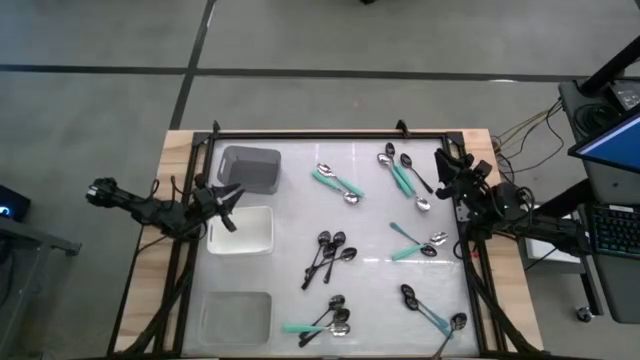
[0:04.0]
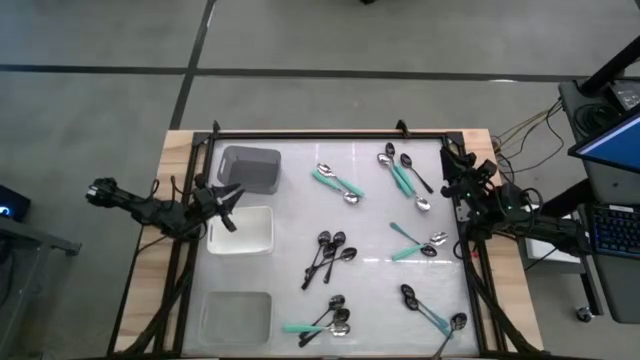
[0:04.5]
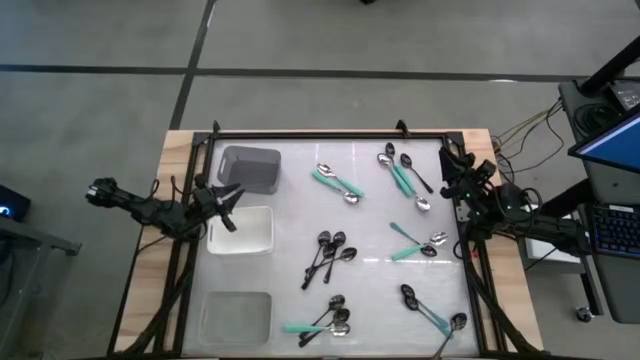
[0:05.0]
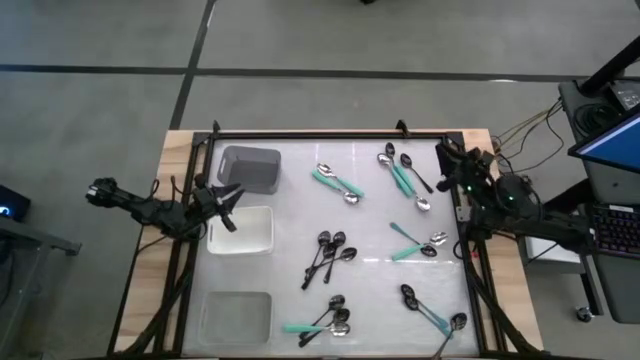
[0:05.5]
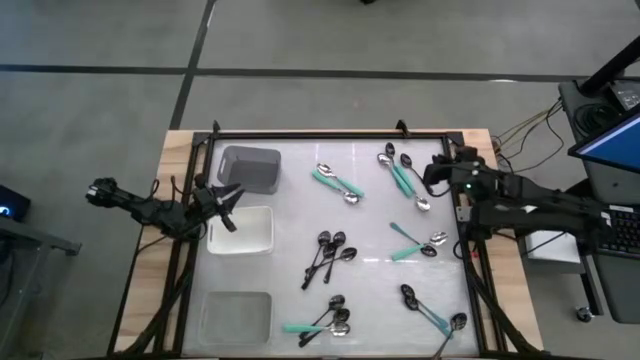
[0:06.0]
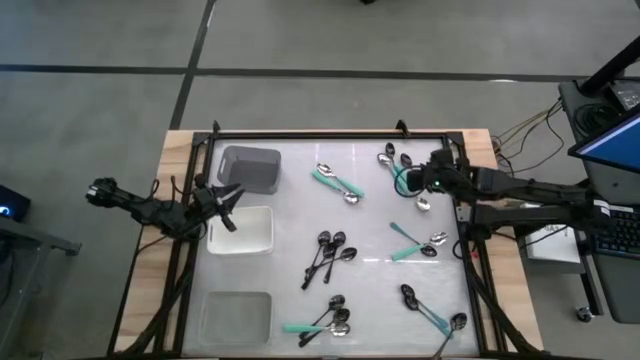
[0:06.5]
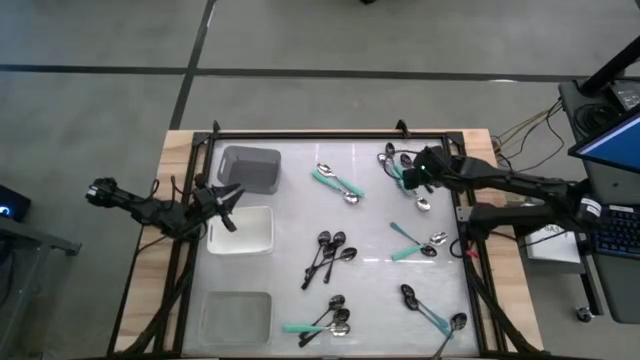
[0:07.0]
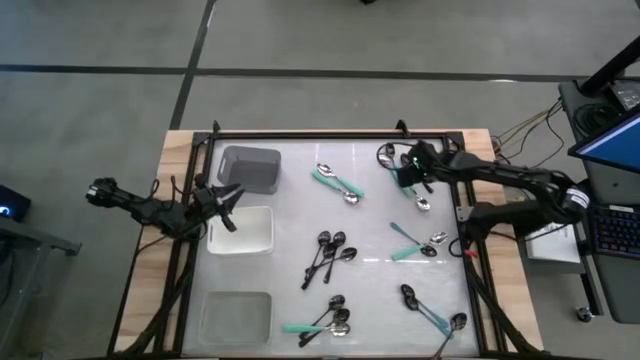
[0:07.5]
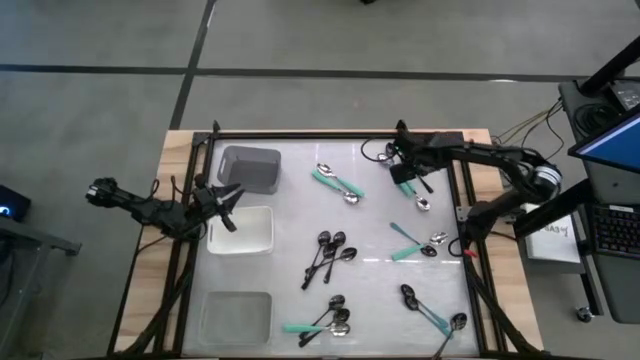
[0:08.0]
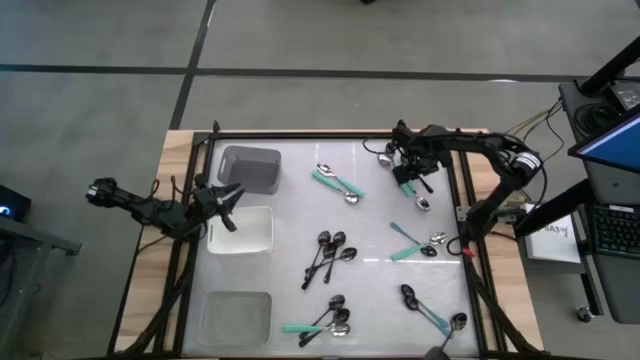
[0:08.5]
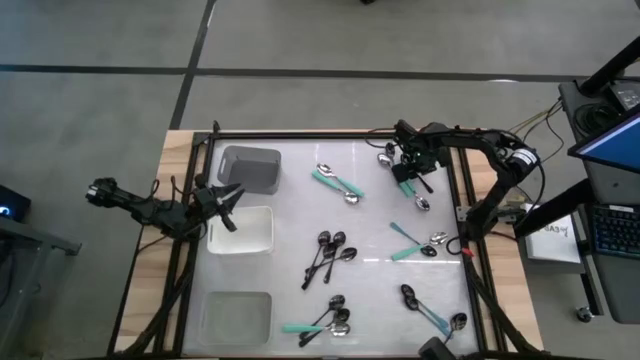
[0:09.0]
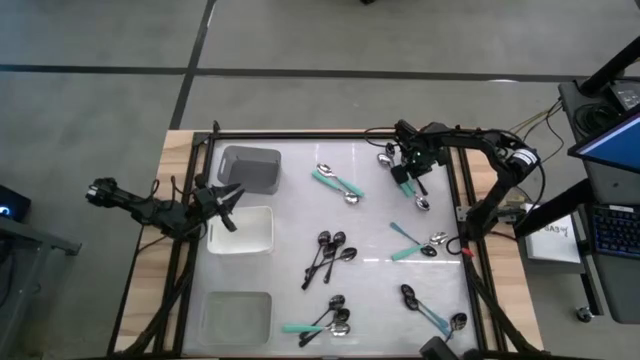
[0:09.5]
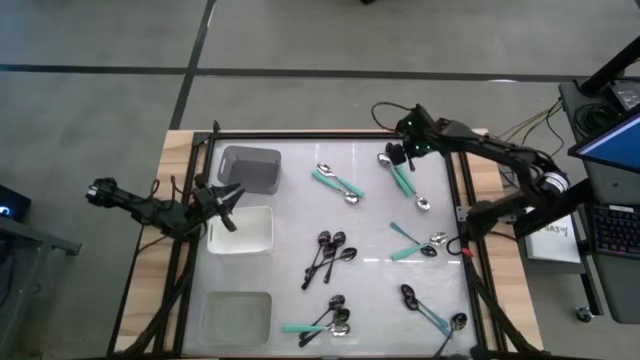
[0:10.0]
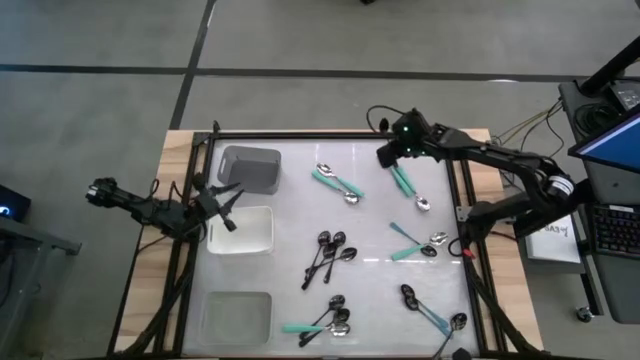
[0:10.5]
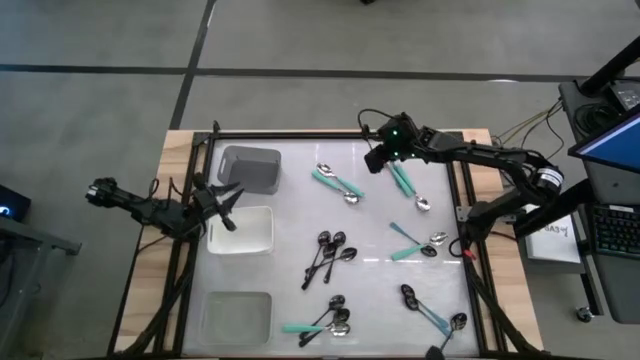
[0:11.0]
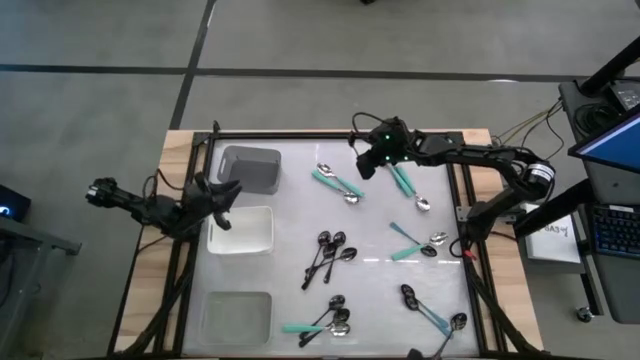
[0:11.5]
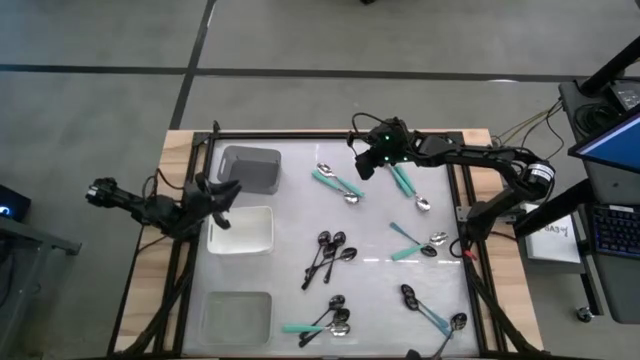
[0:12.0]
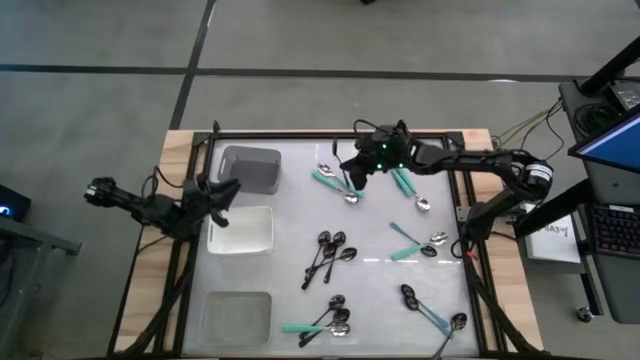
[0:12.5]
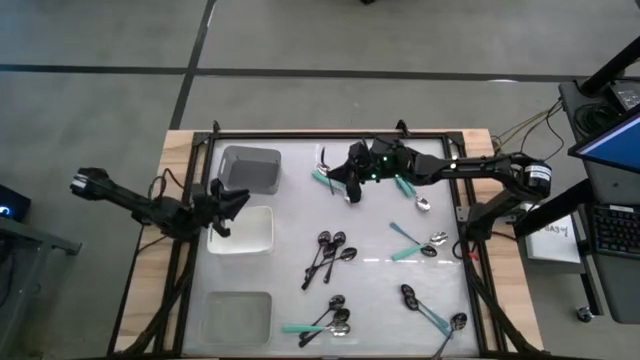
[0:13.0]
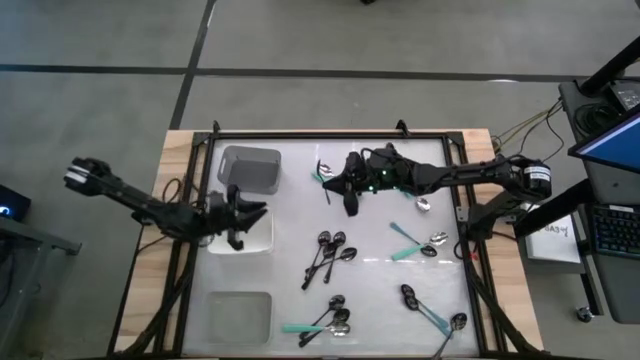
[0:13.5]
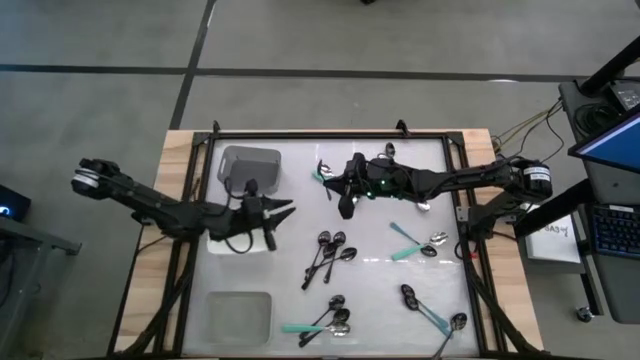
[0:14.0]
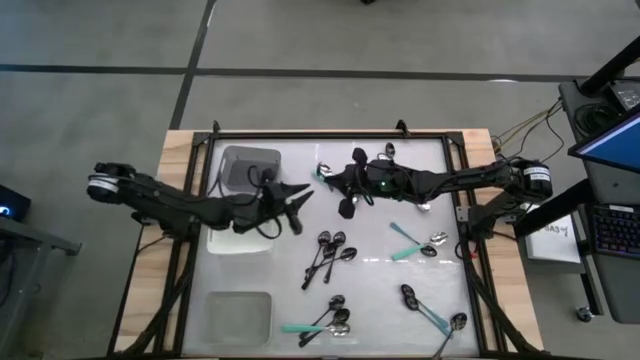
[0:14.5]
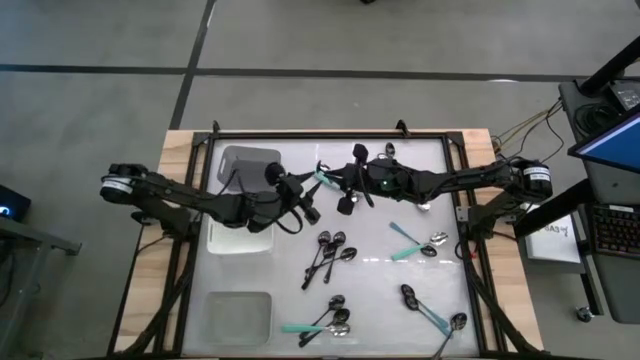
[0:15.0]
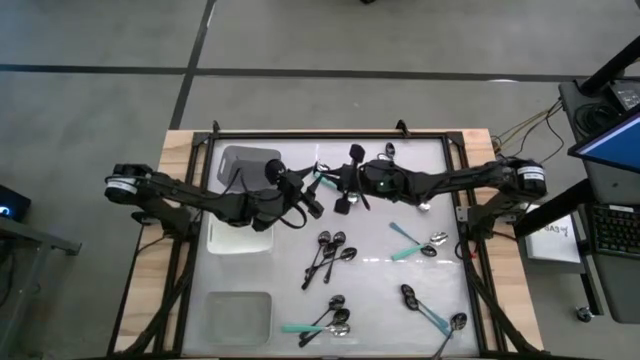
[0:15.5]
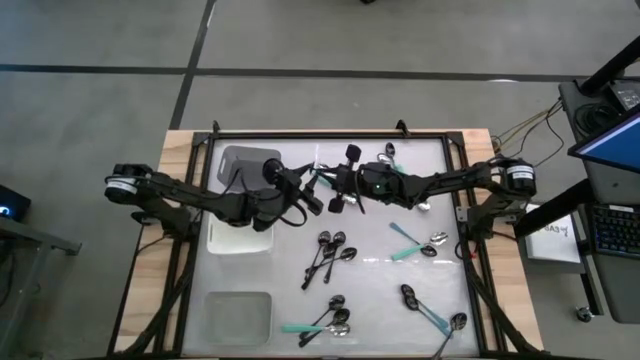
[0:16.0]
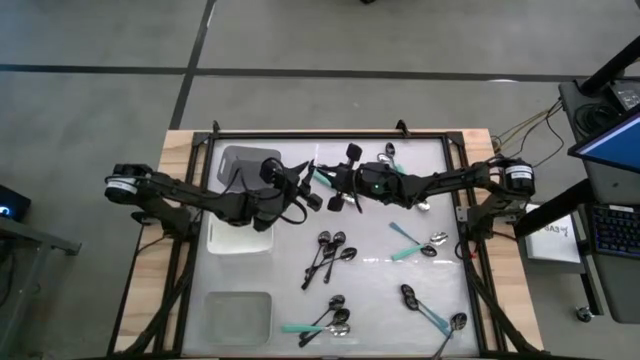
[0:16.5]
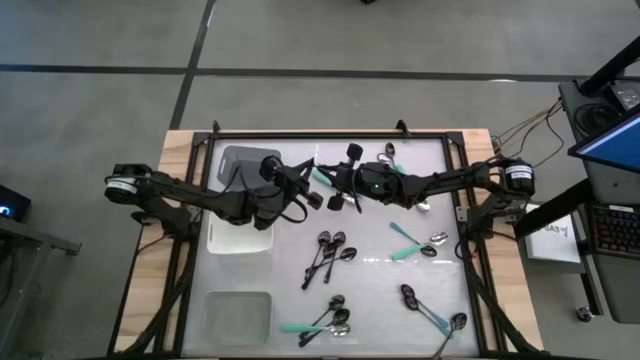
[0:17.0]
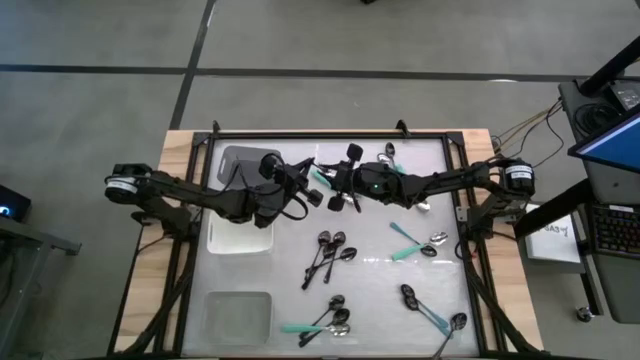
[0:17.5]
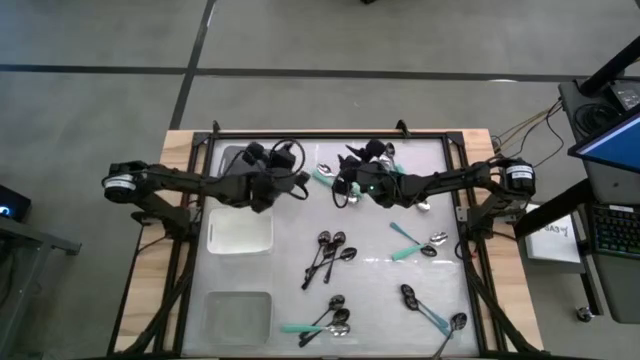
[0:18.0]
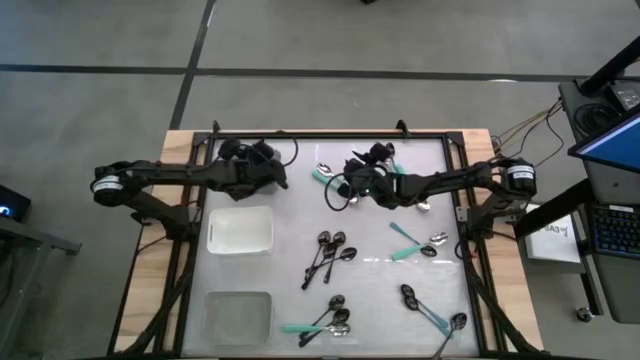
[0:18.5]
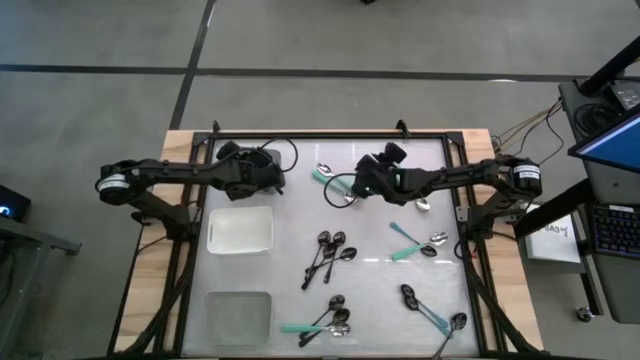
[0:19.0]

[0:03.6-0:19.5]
Task: Sort silverware by color (type)
Put the black spoon into the black bin

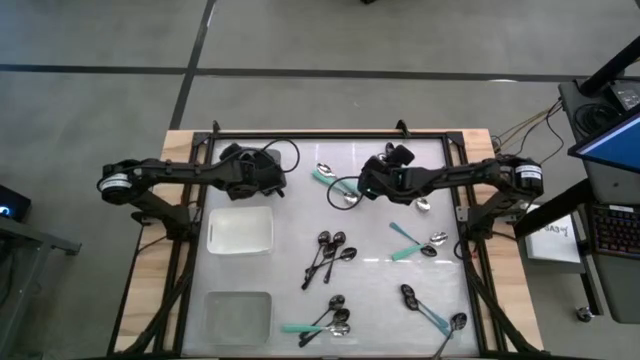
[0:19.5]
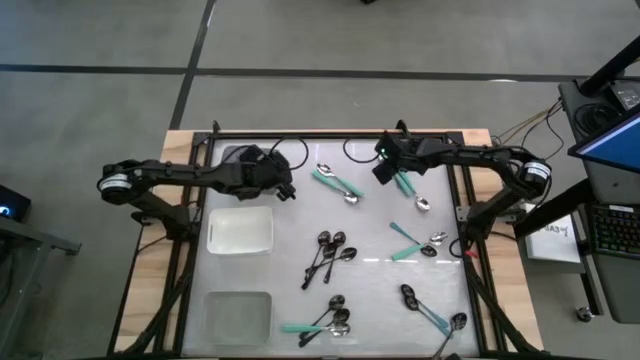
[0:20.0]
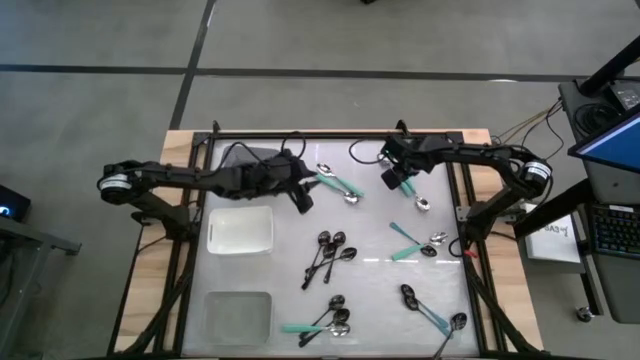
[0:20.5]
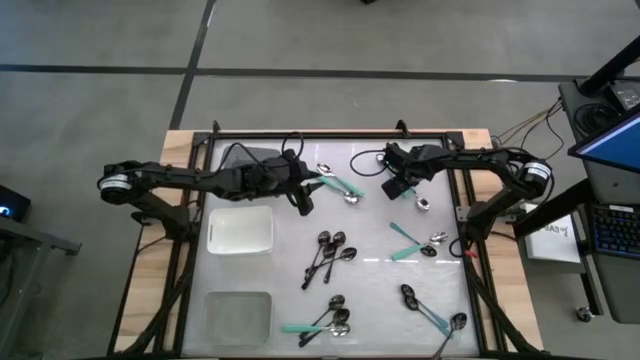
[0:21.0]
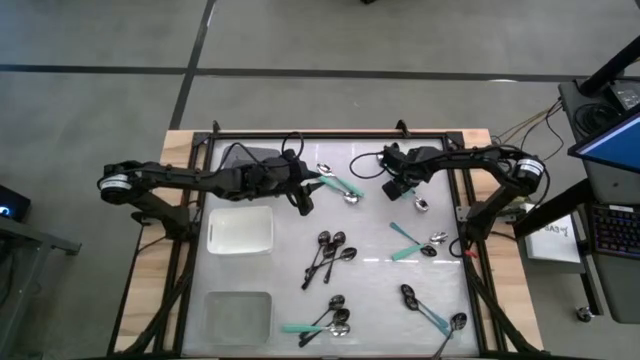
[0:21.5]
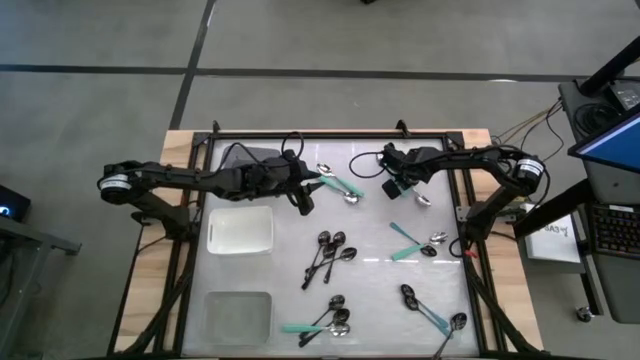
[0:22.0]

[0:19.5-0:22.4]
Put the light green spoon into the white bin

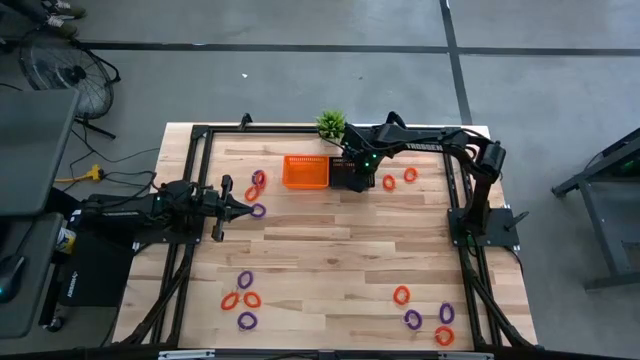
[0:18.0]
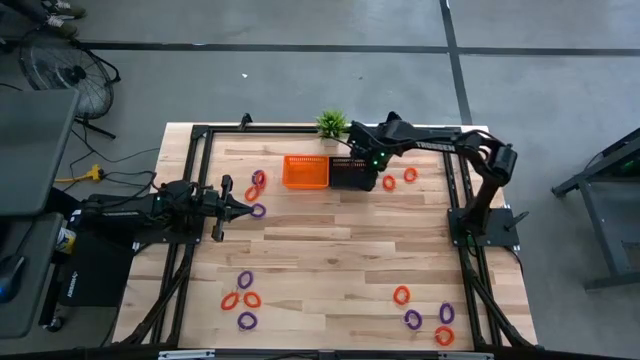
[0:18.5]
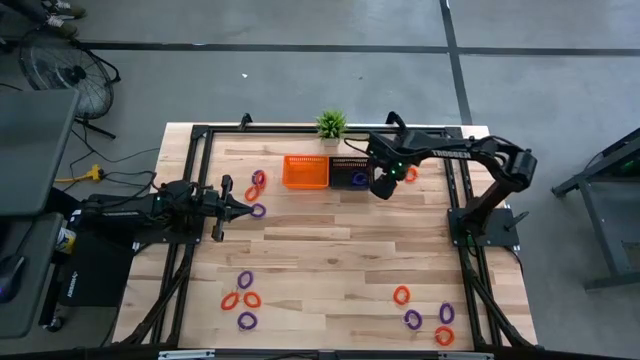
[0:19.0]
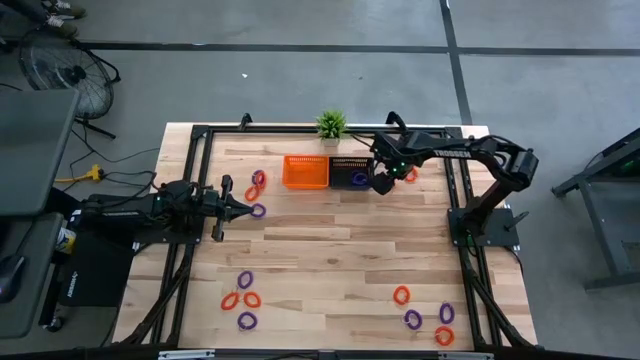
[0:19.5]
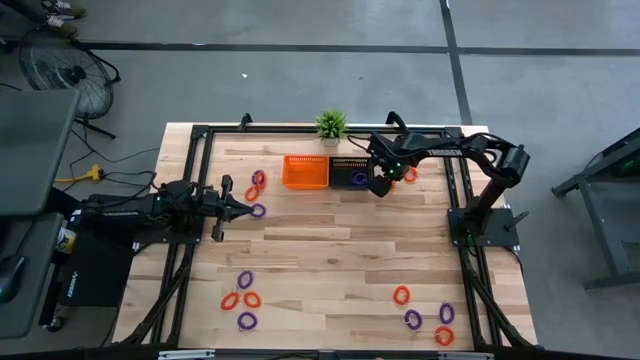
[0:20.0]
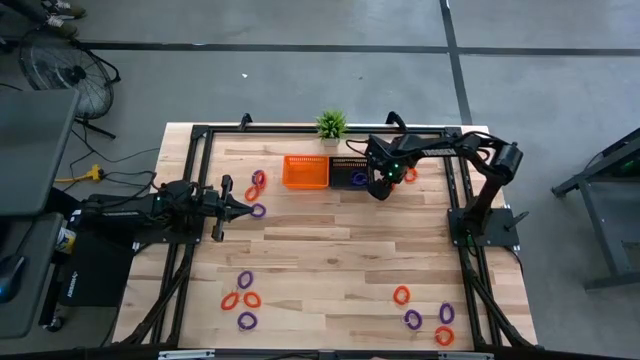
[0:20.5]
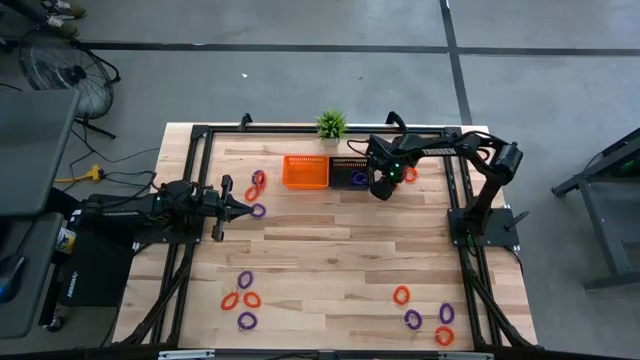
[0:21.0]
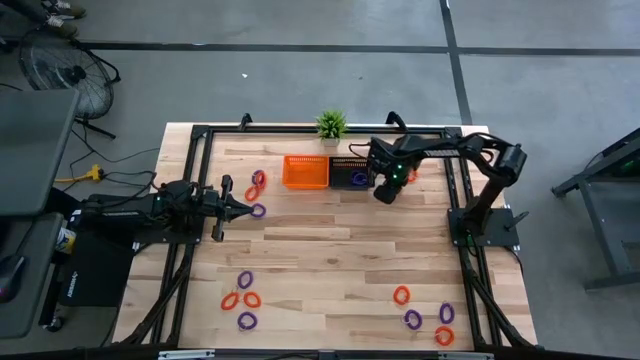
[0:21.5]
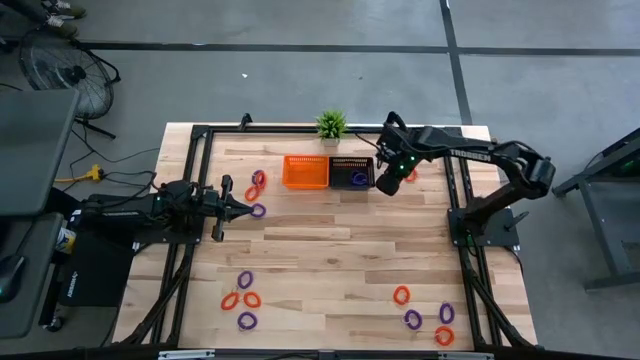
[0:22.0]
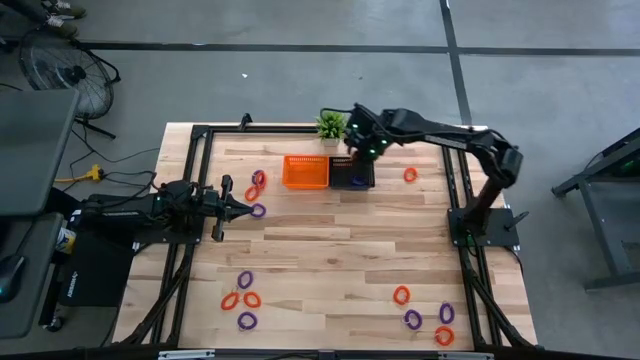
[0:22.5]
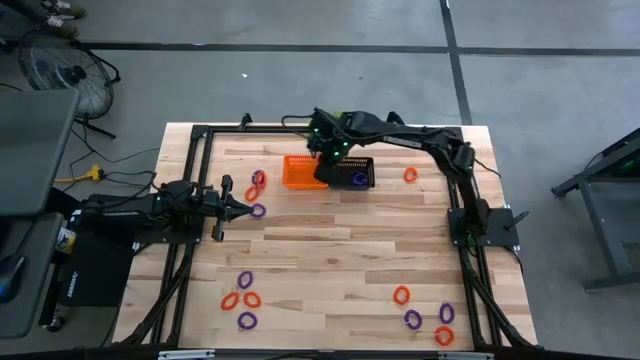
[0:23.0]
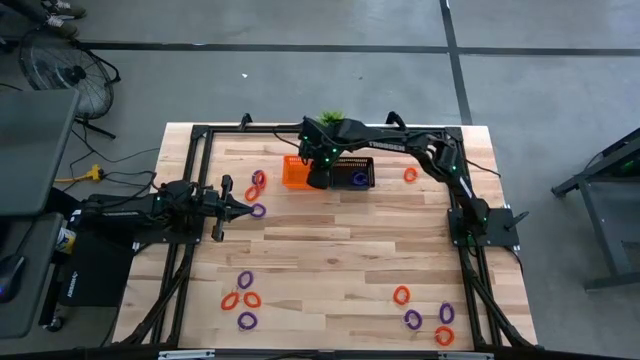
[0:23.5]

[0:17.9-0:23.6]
Task: Sort spring keychains into baskets
Put the orange spring keychain into the orange basket
